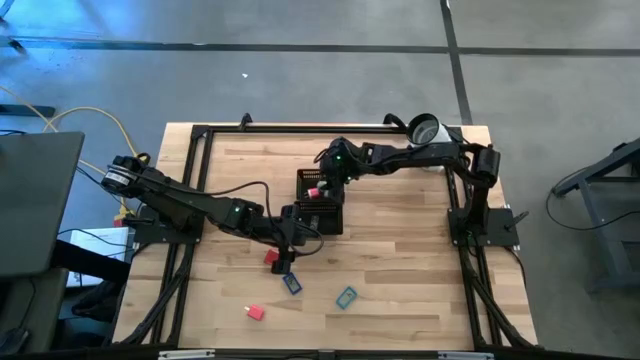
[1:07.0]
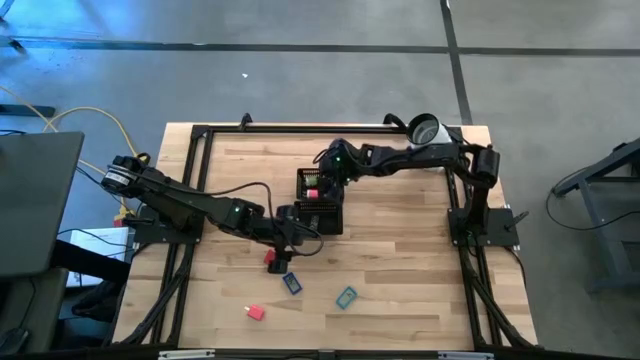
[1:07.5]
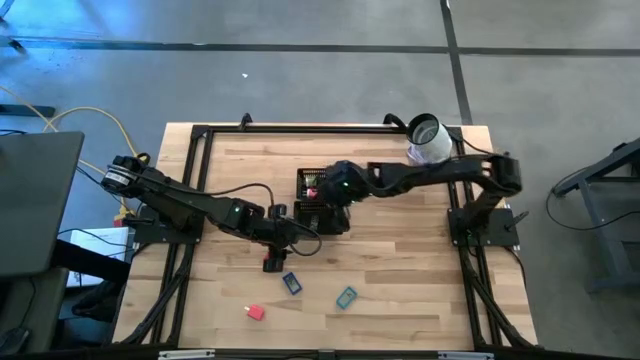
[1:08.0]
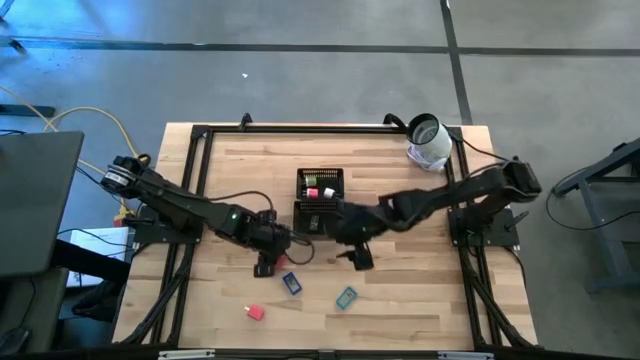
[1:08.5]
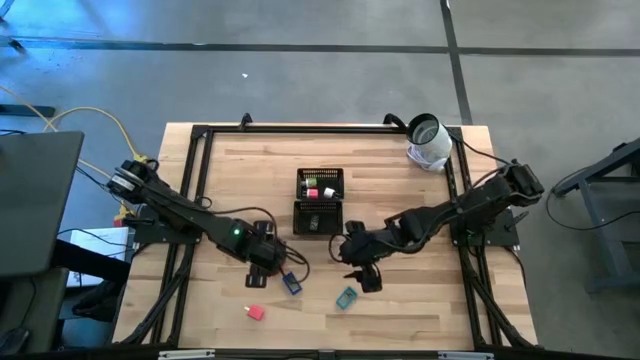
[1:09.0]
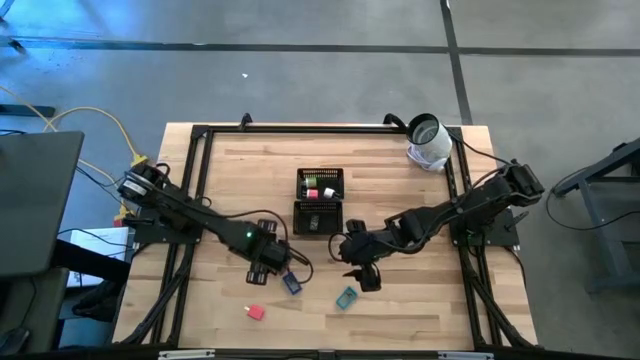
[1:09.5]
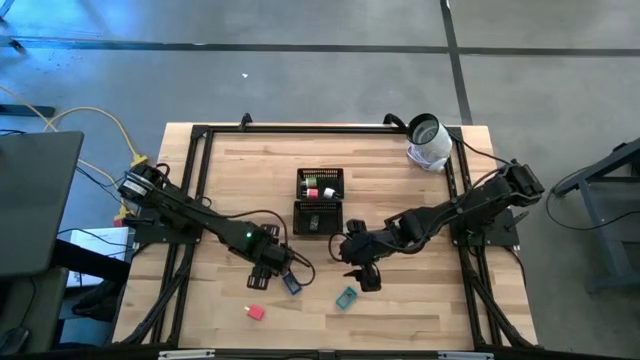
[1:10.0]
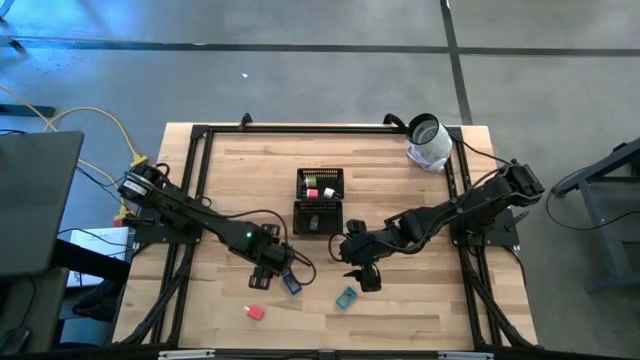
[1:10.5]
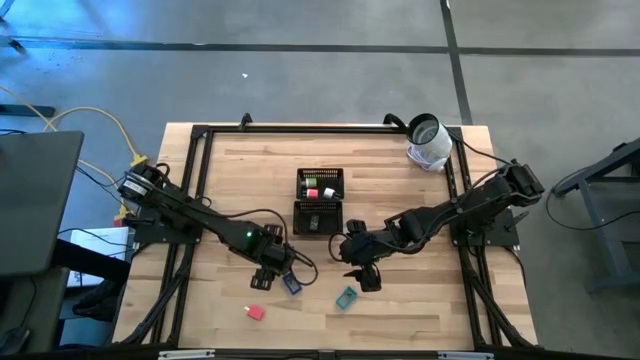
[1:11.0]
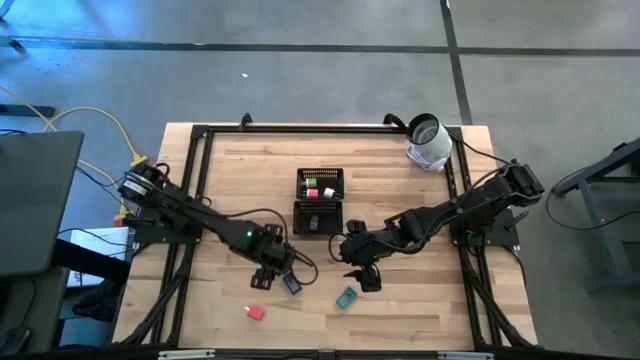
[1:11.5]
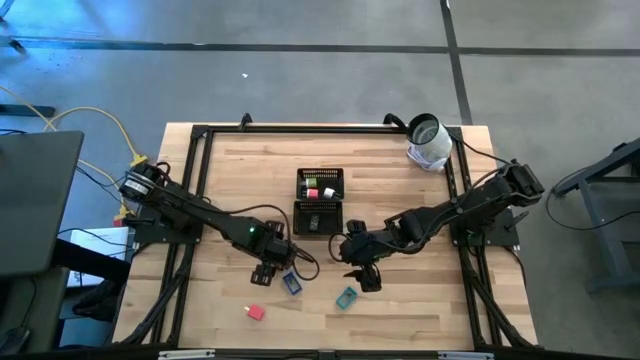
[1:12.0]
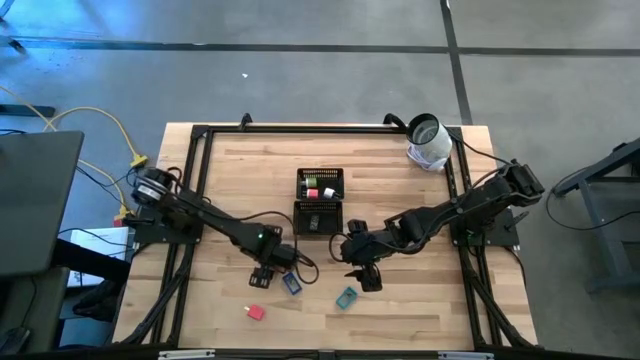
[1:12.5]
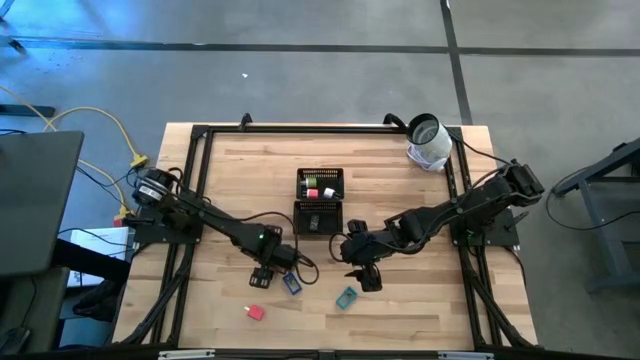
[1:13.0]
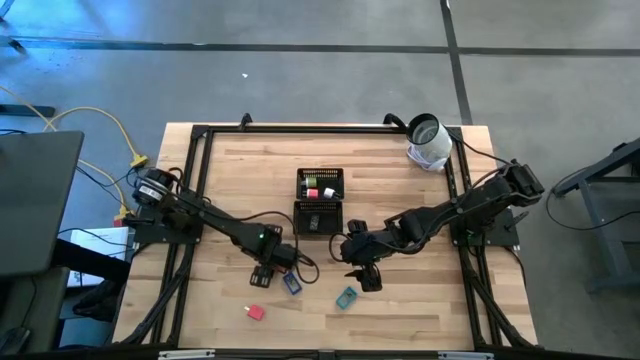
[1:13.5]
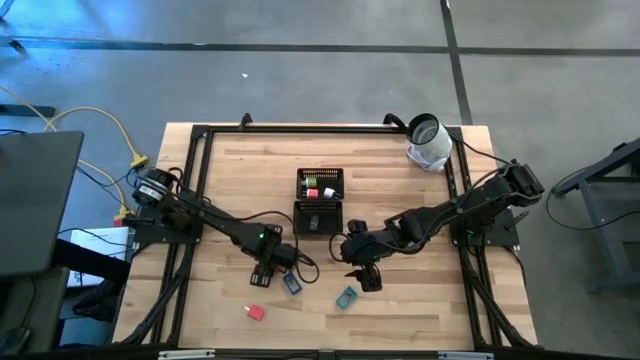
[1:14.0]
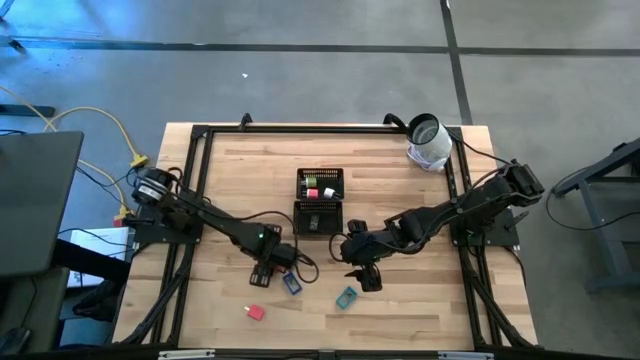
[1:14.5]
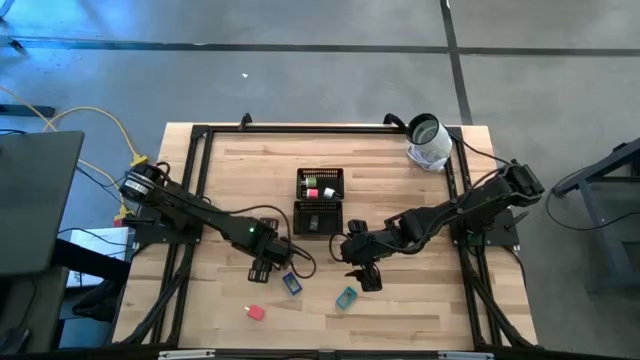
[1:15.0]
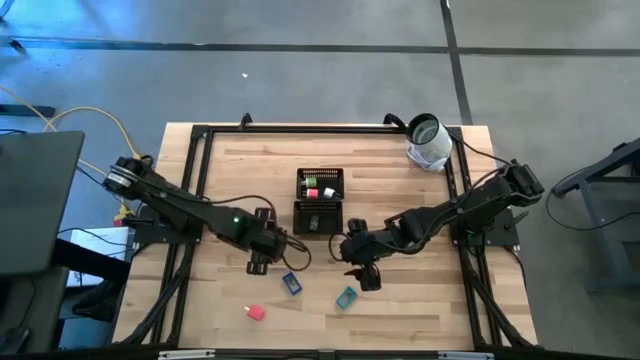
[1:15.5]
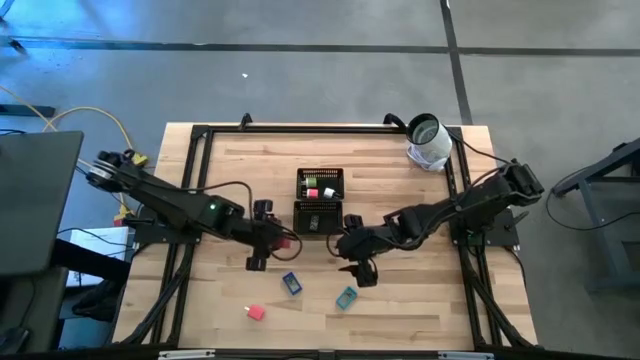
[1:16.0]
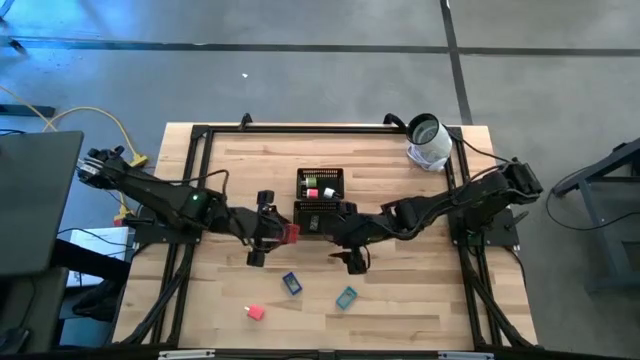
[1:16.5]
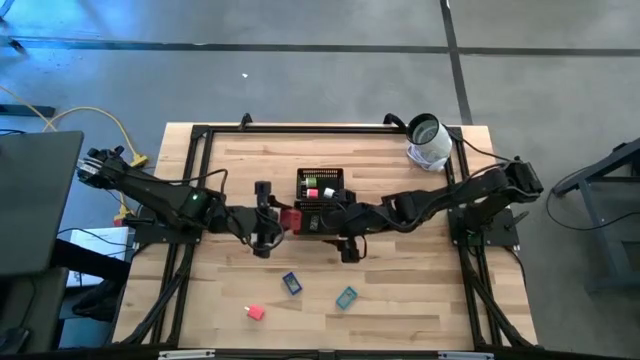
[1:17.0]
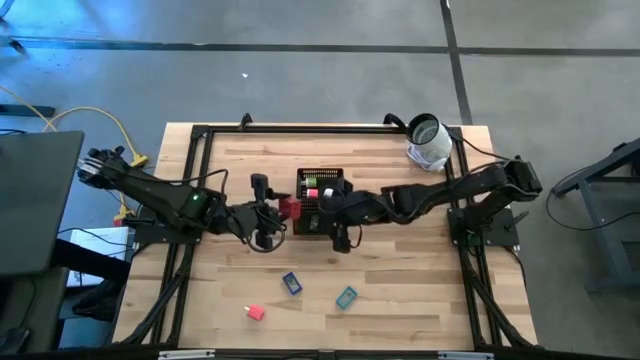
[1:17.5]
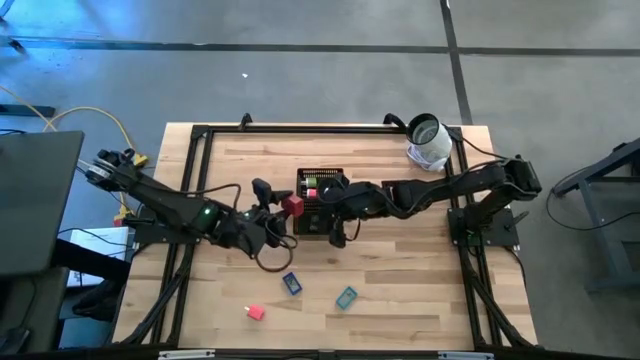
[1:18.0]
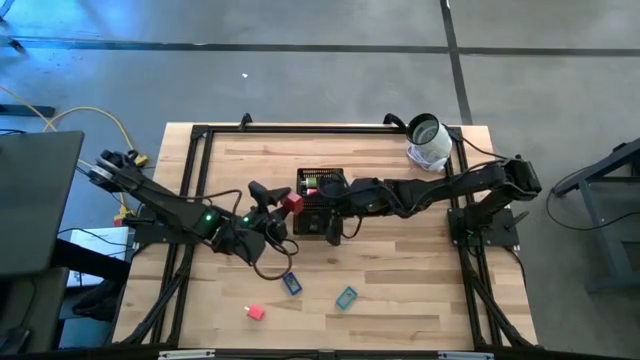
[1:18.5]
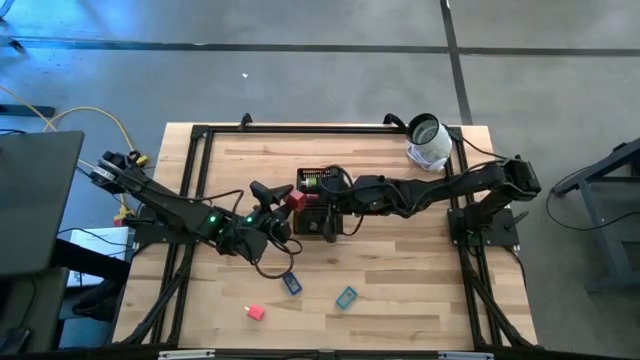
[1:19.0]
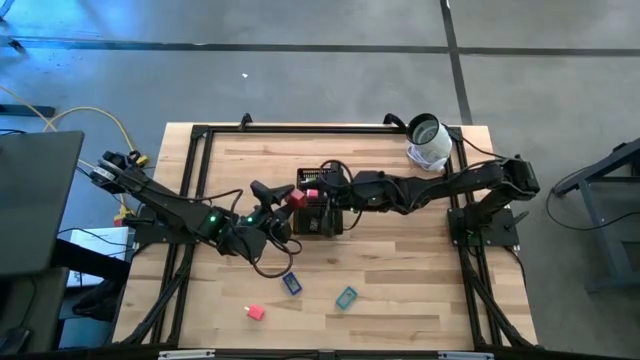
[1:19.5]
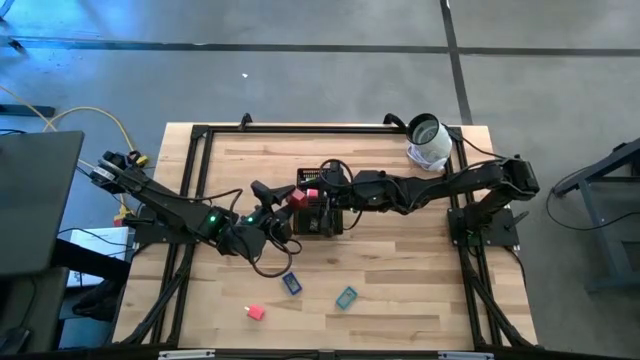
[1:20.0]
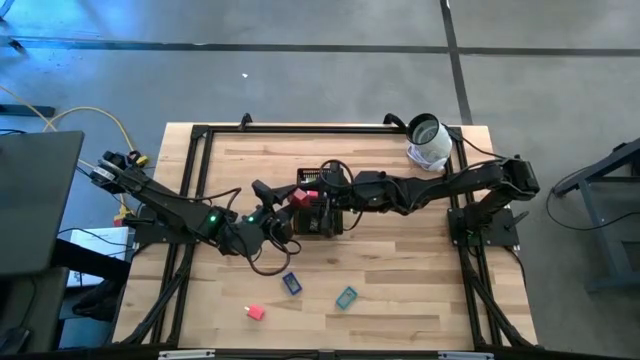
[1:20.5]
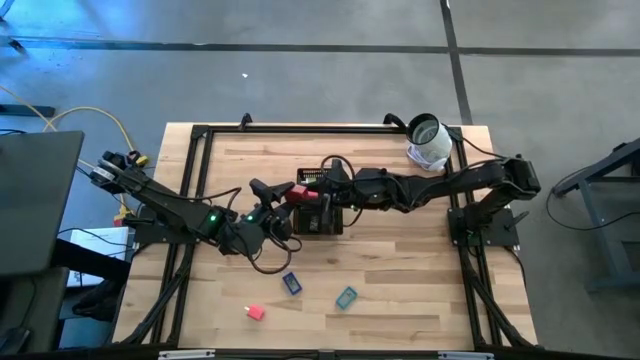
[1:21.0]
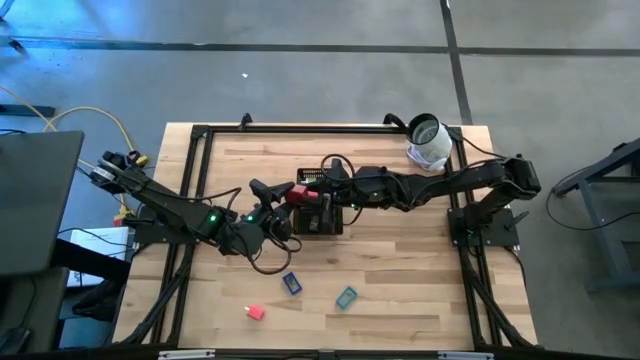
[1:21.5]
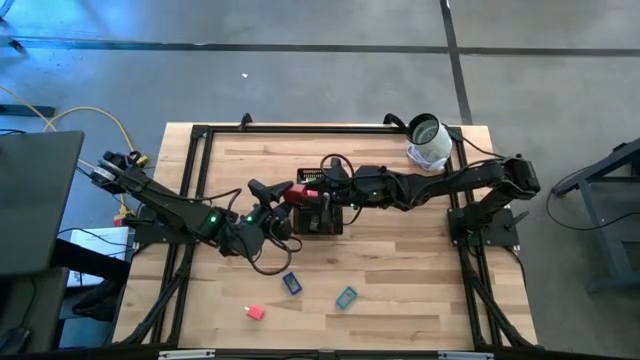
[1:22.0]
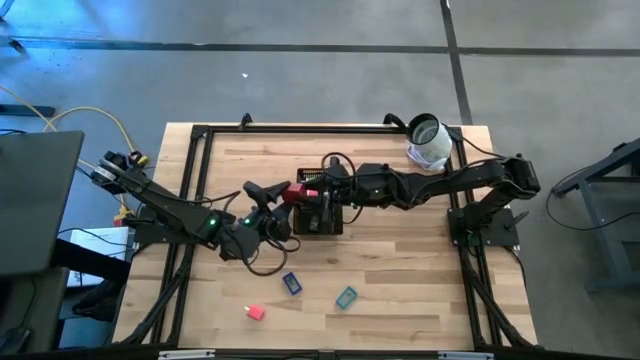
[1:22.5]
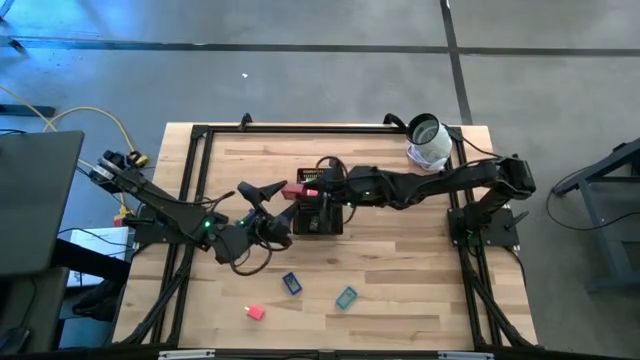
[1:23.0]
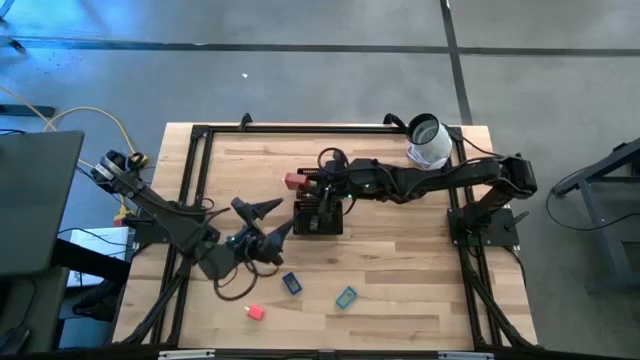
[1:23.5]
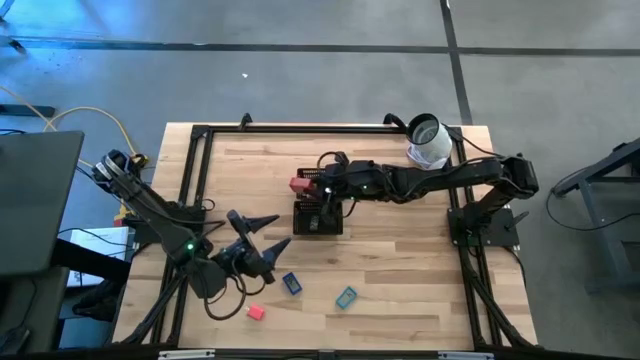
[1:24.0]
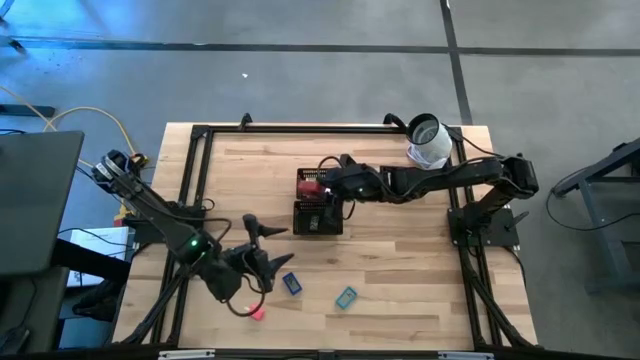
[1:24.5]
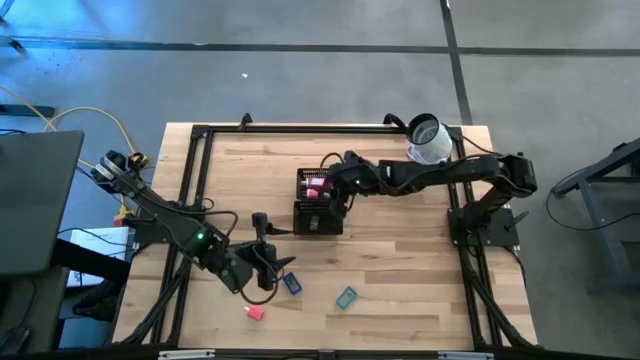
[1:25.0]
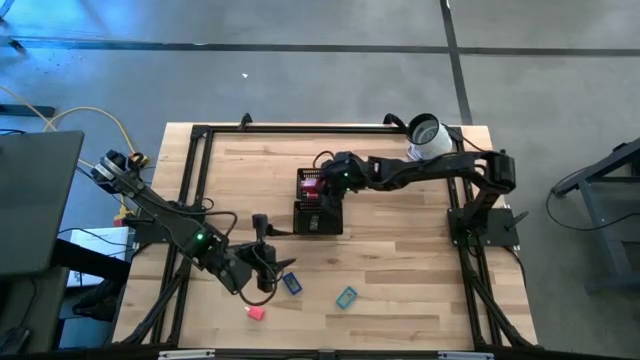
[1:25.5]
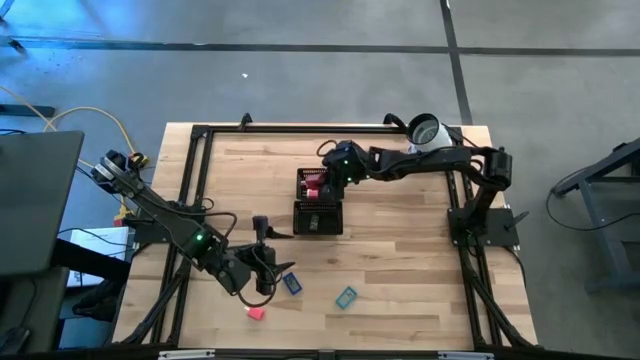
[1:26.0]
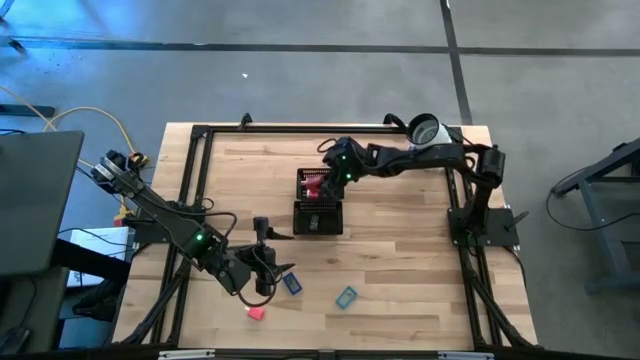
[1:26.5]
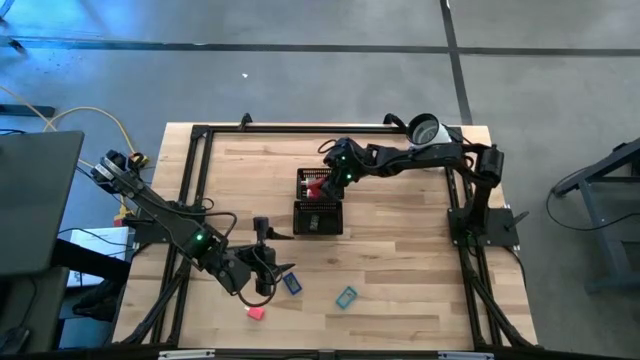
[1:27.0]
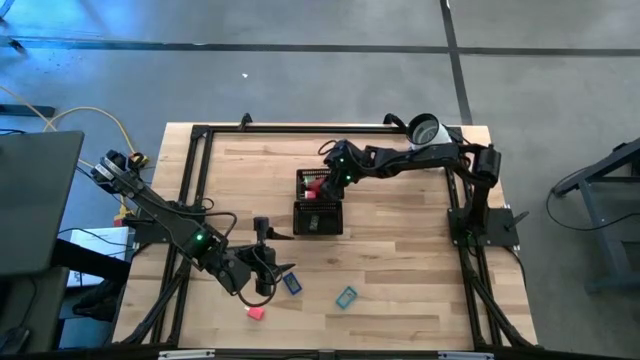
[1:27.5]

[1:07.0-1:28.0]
Task: Pick & Place Office items
Put the red charger adapter into the top black bin

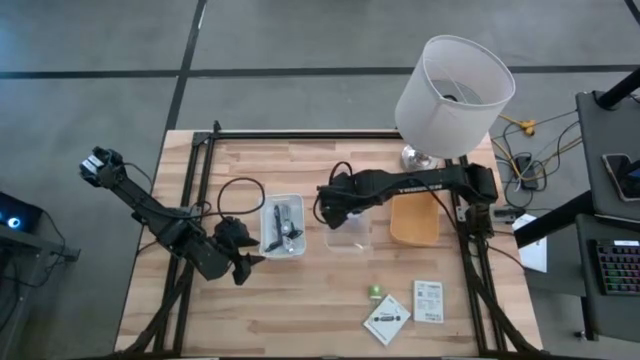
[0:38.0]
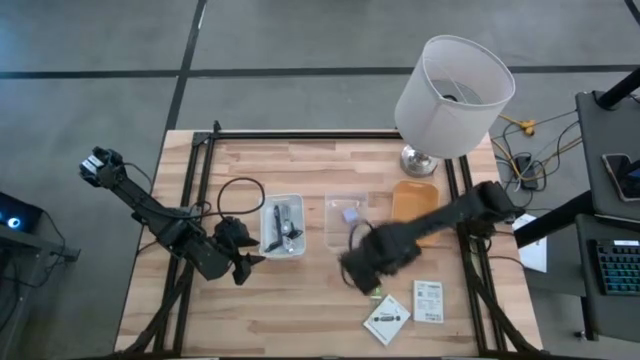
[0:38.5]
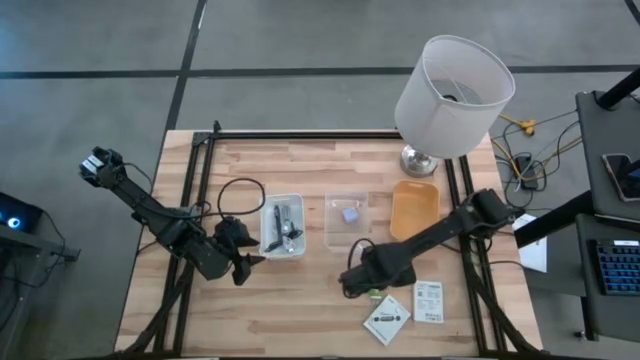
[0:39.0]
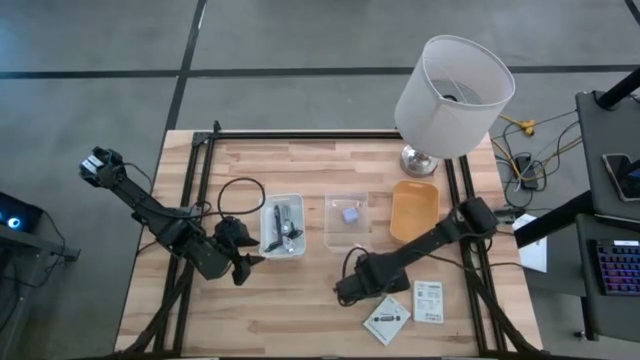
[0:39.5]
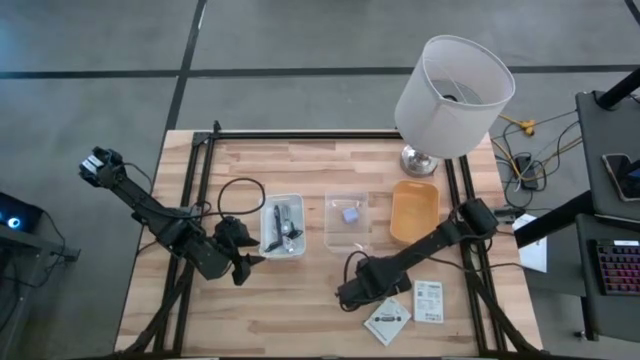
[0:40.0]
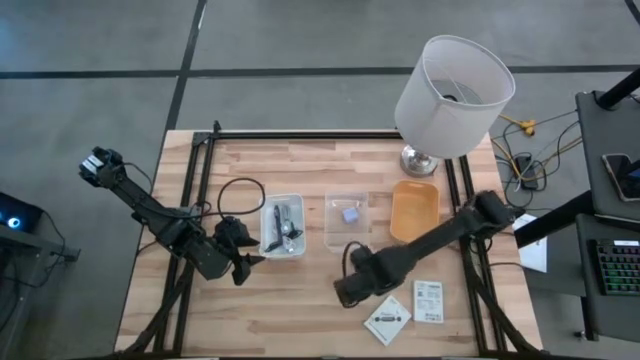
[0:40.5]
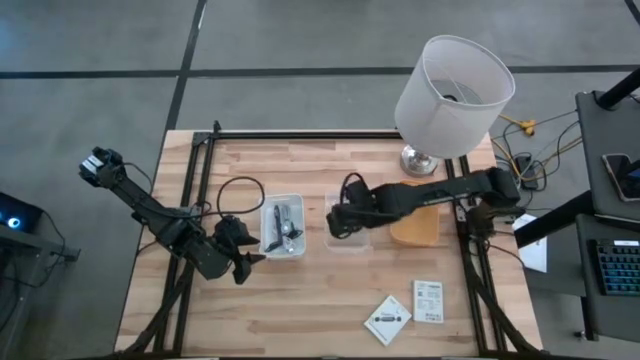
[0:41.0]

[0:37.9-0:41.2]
Task: Pick and place items into bin
Put the green charger adapter into the transparent bin
